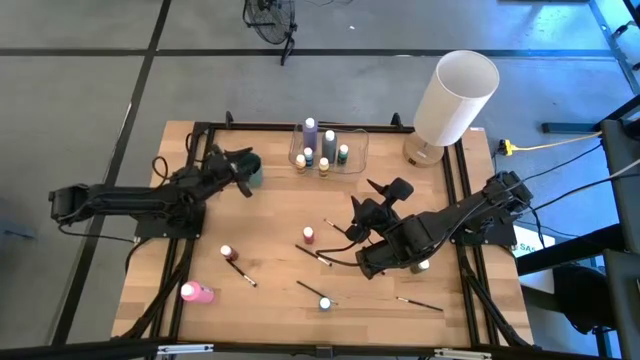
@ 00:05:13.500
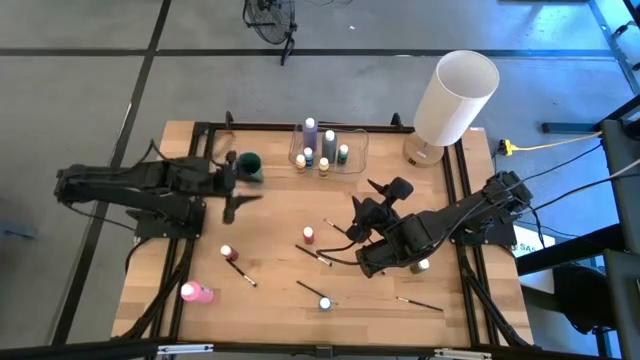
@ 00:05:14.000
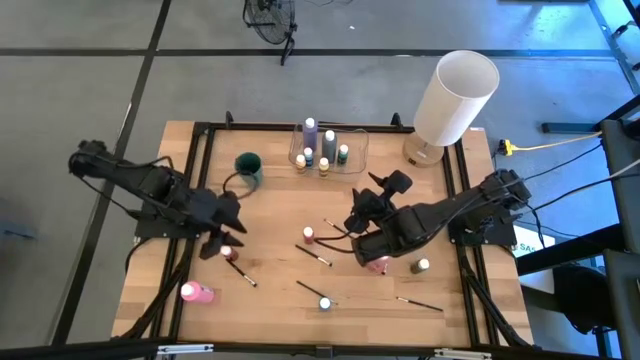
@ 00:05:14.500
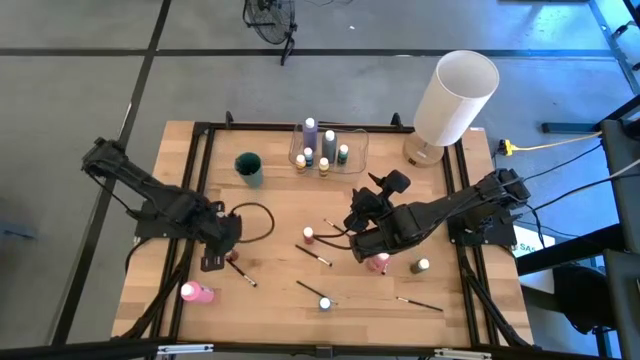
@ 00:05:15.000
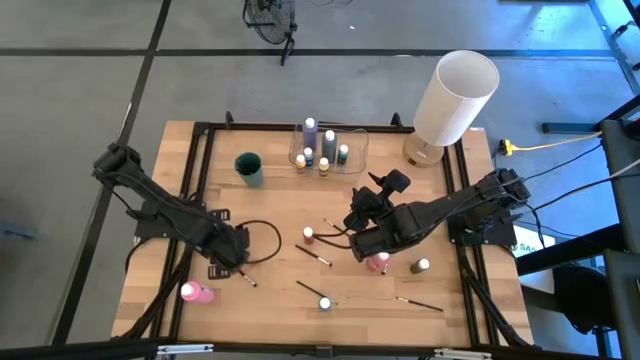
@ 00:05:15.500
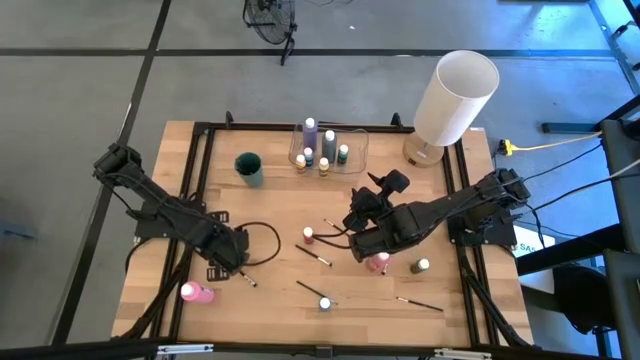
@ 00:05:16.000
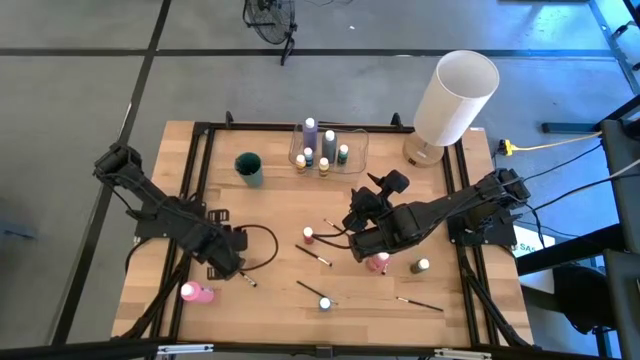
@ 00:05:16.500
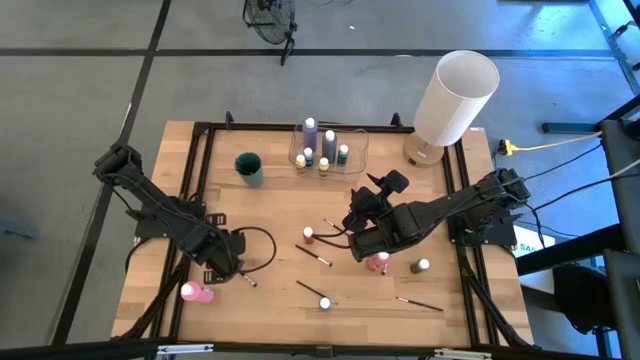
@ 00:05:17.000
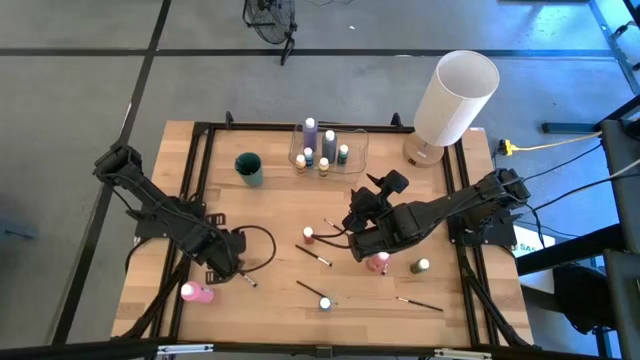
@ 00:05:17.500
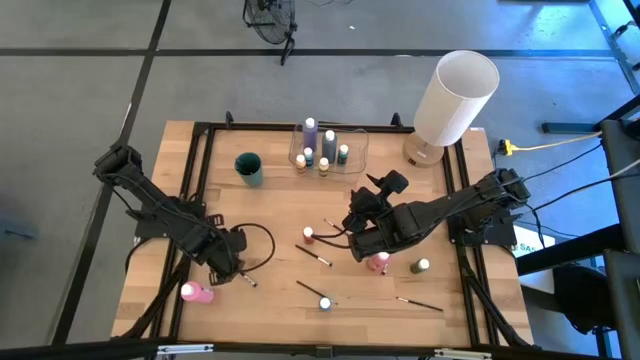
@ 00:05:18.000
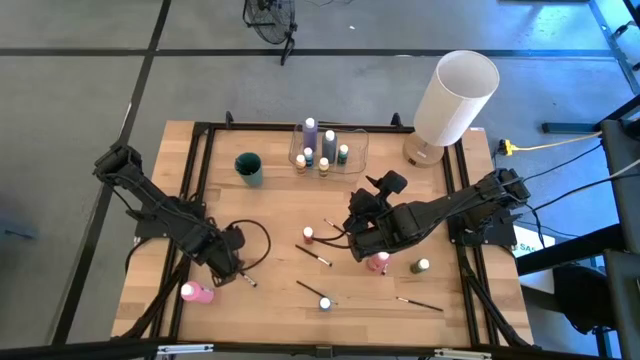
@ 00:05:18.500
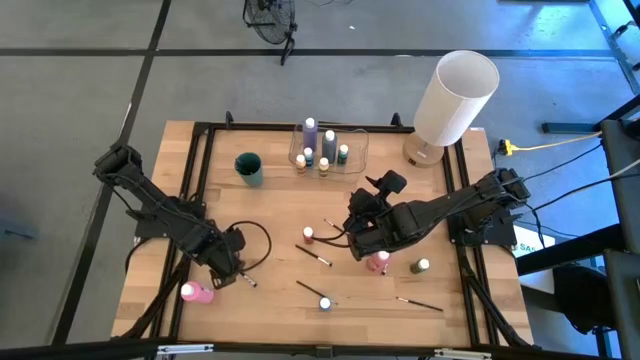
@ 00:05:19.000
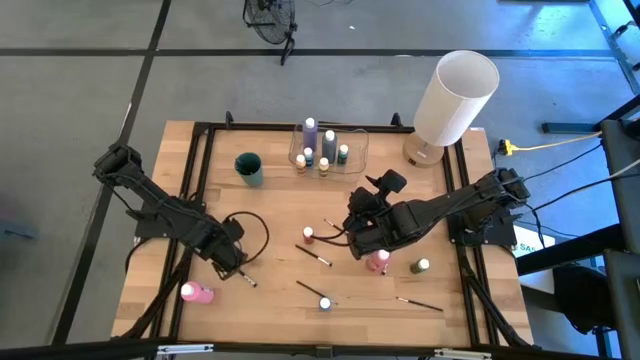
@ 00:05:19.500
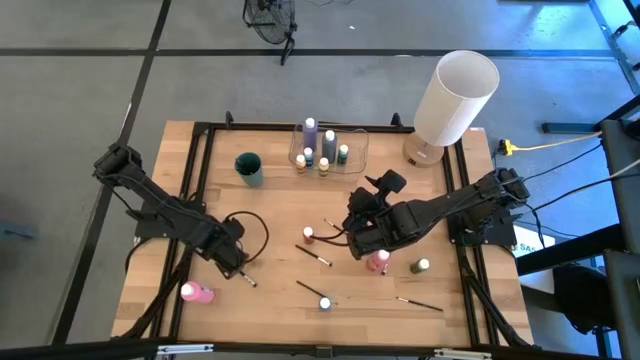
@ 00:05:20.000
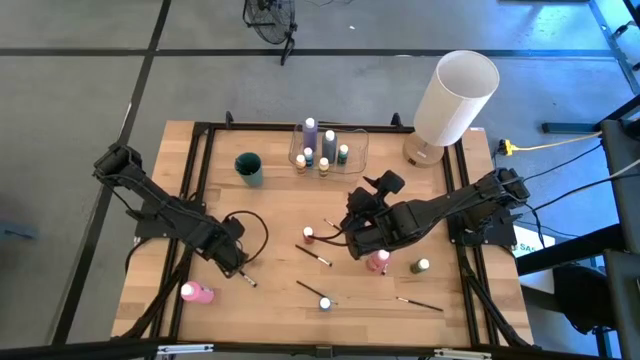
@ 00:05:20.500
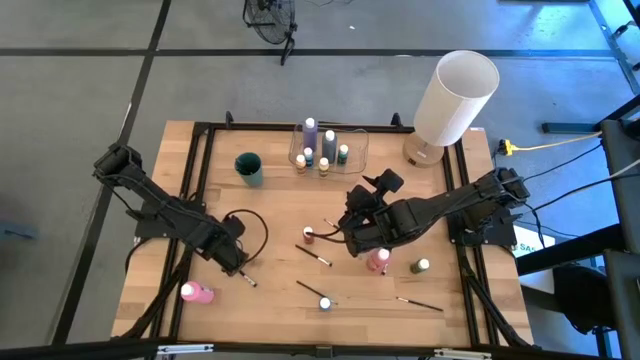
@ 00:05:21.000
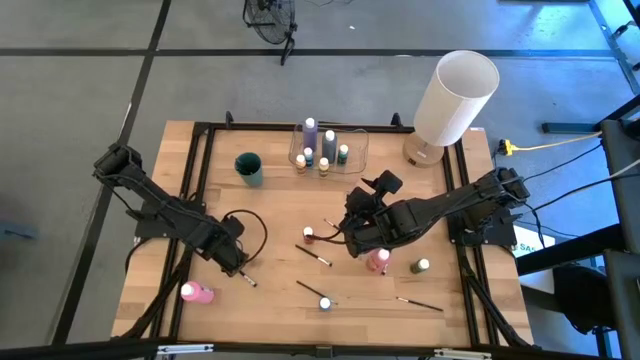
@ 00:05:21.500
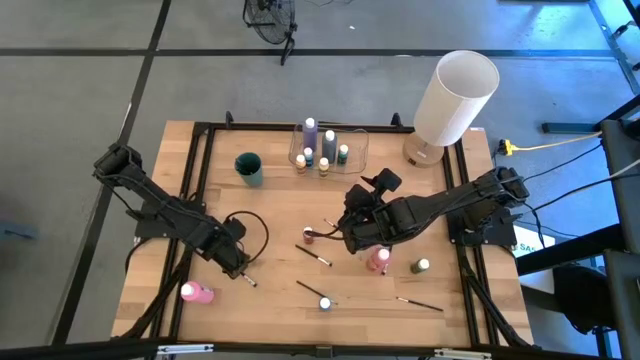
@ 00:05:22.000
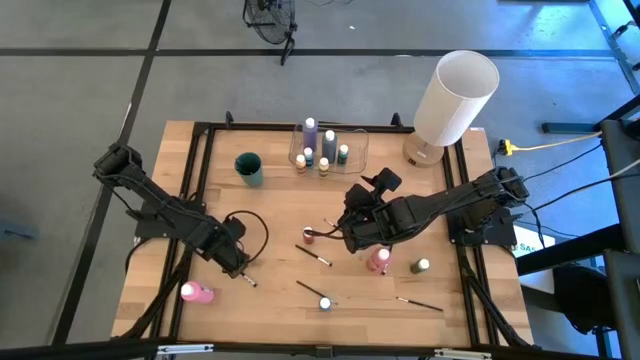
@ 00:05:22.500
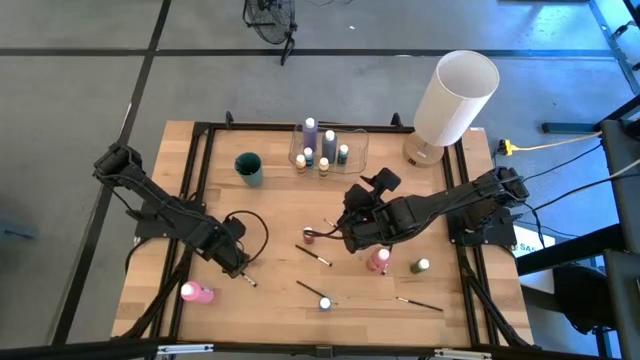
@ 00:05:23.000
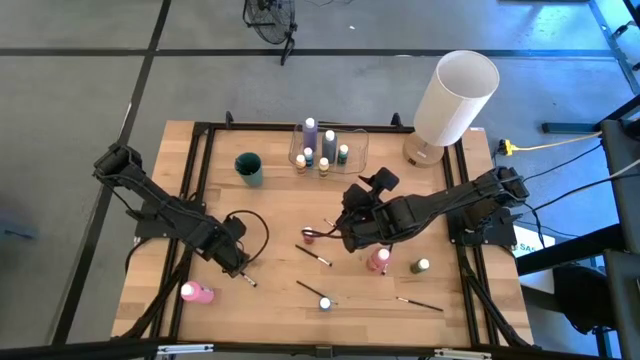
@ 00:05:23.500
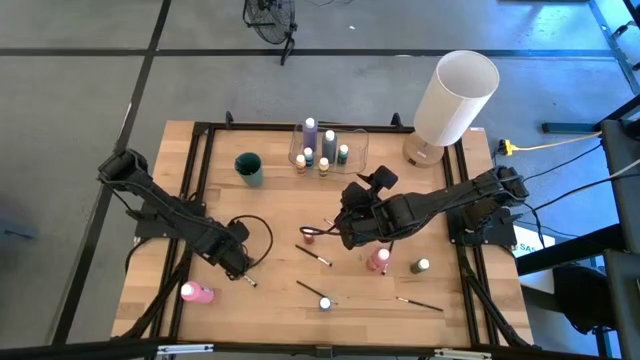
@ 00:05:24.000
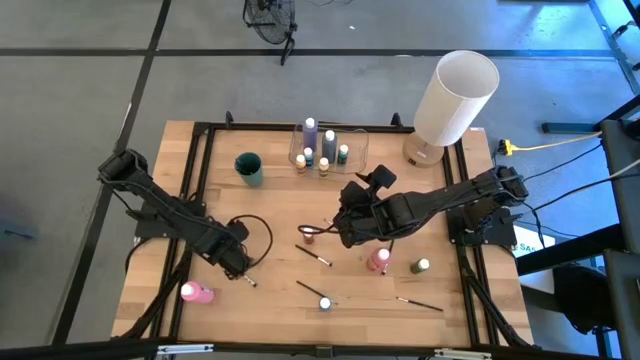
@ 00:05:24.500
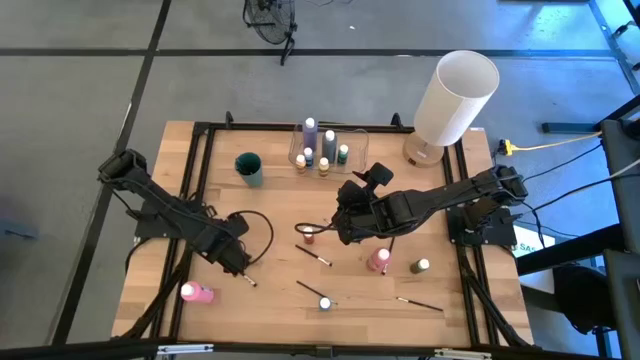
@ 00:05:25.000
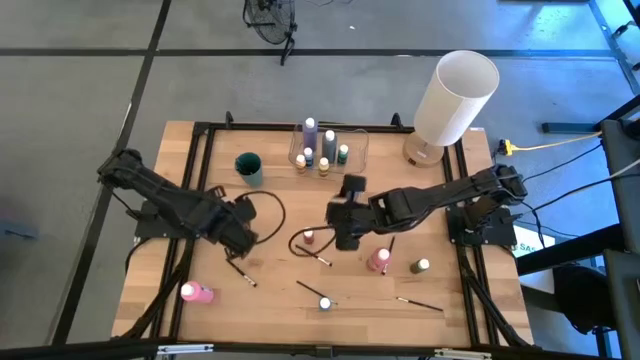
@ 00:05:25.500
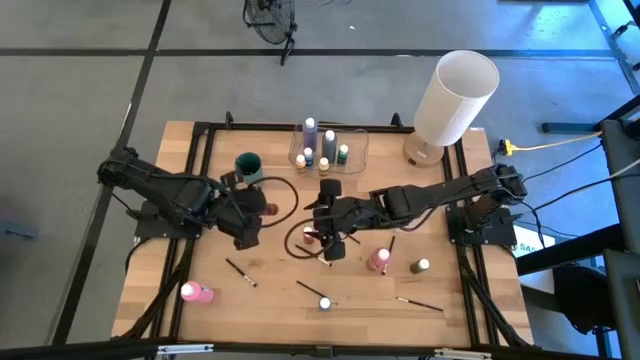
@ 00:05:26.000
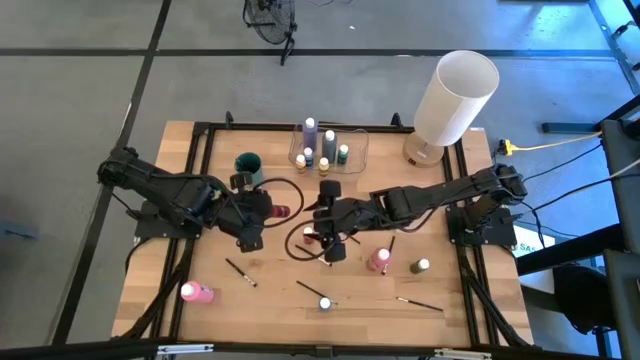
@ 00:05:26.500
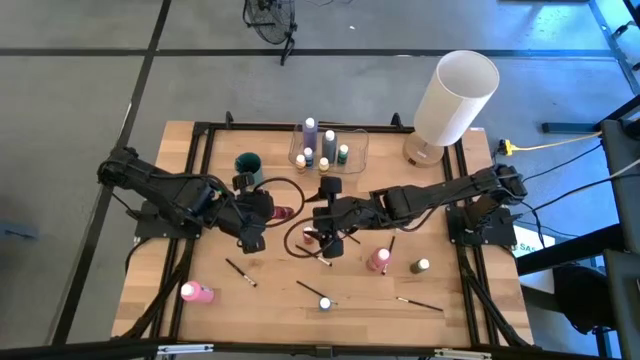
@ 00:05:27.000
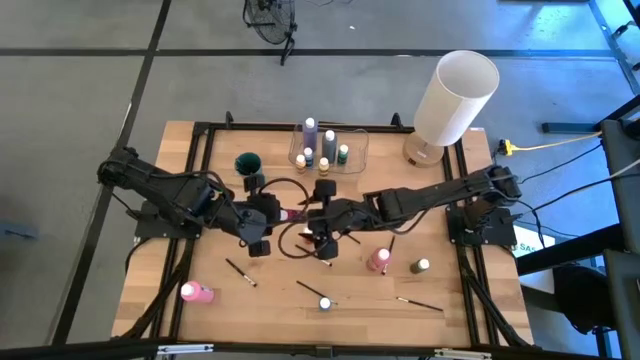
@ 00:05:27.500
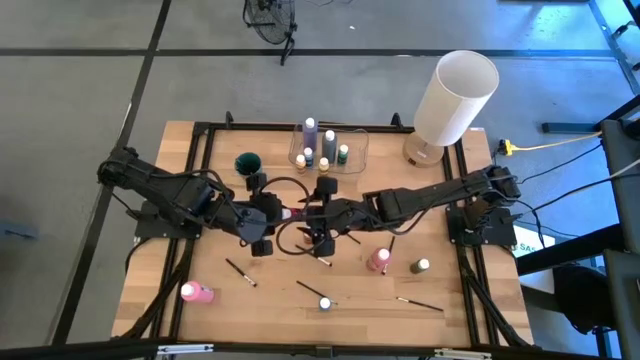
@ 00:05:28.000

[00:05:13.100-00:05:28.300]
Task: Pick & Place Paint Supplies
Put the red paint bottle into the transparent bin

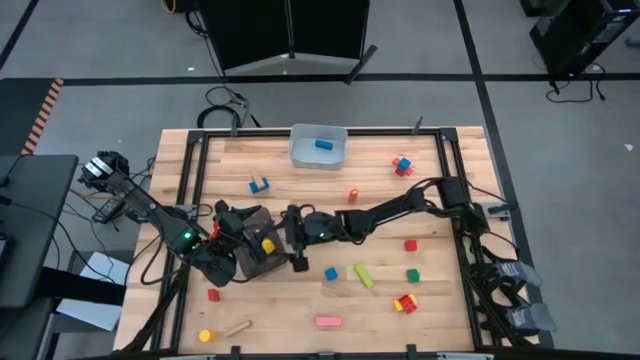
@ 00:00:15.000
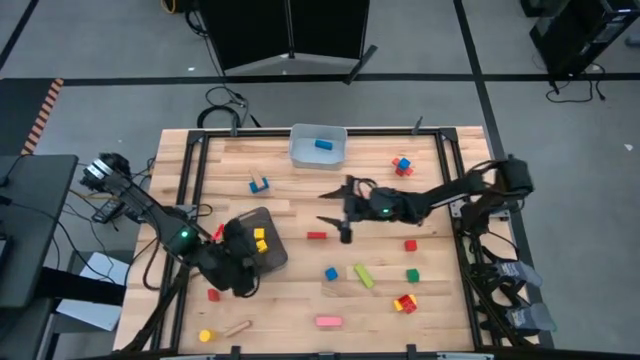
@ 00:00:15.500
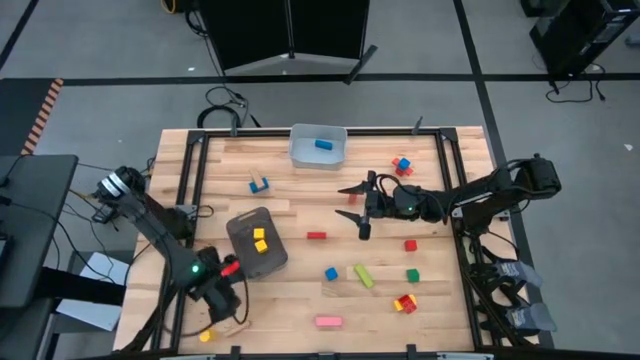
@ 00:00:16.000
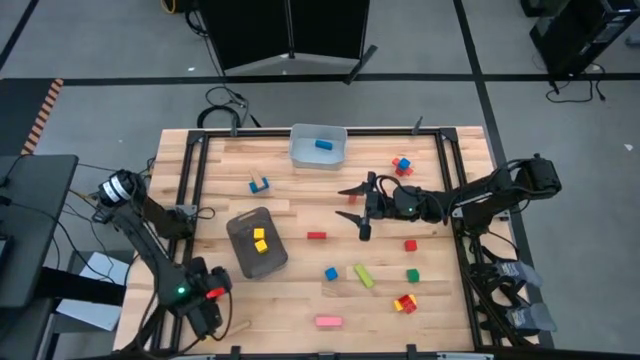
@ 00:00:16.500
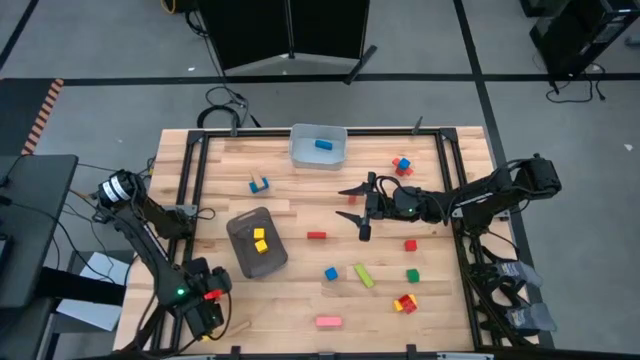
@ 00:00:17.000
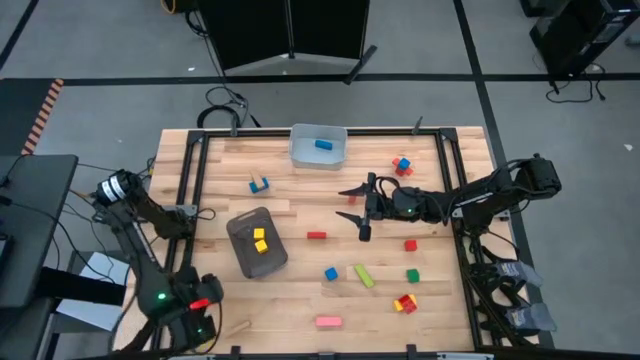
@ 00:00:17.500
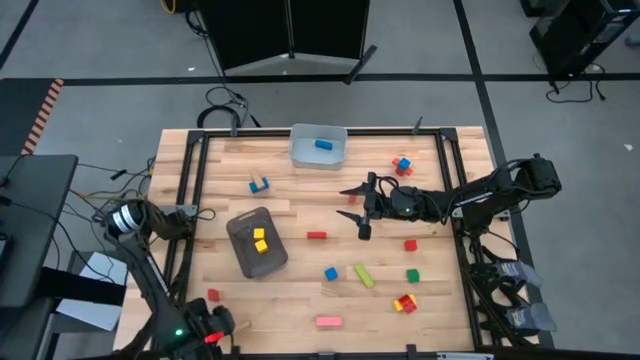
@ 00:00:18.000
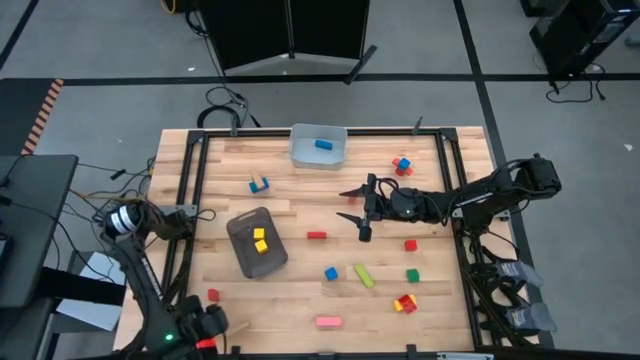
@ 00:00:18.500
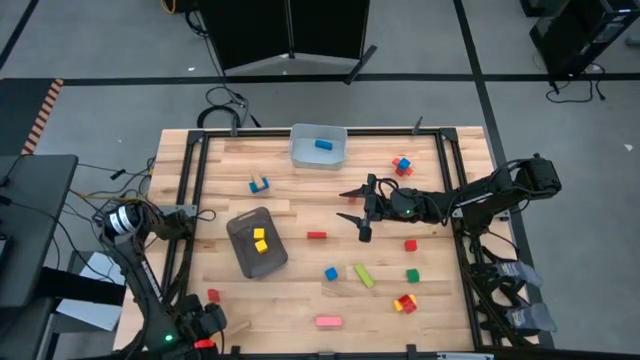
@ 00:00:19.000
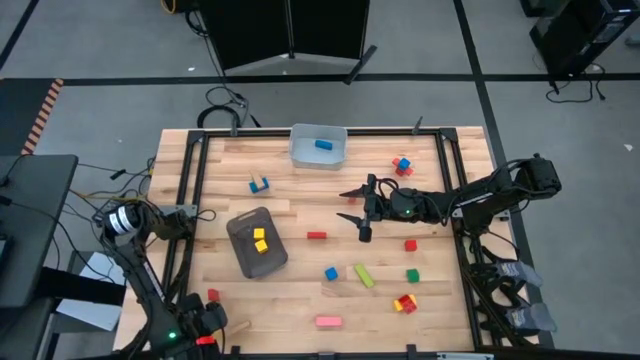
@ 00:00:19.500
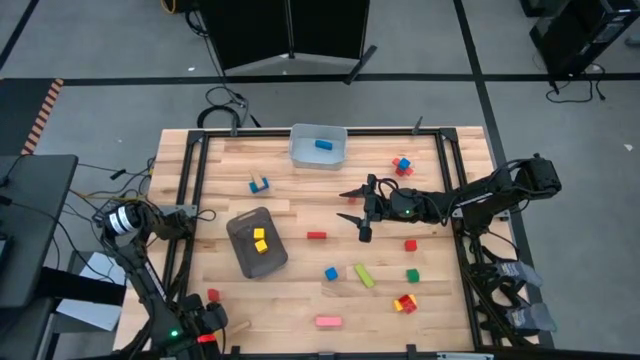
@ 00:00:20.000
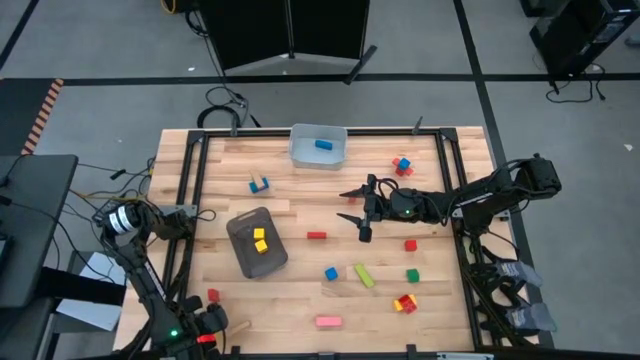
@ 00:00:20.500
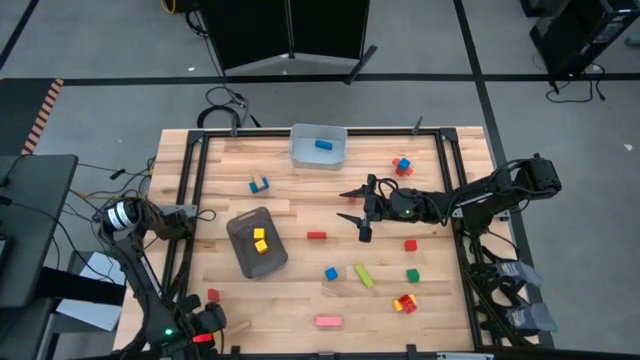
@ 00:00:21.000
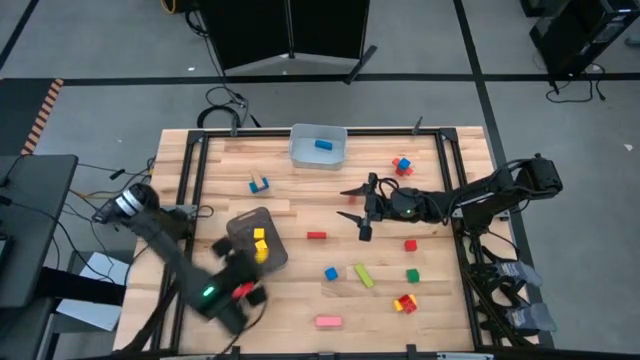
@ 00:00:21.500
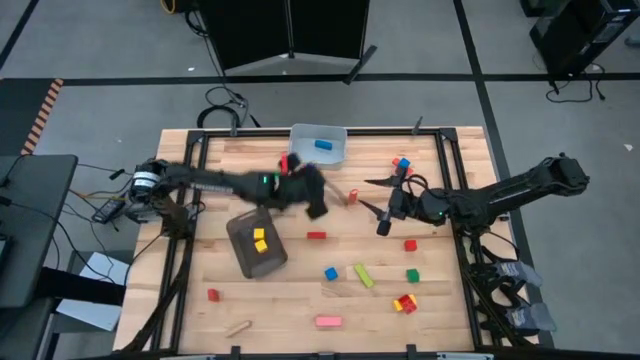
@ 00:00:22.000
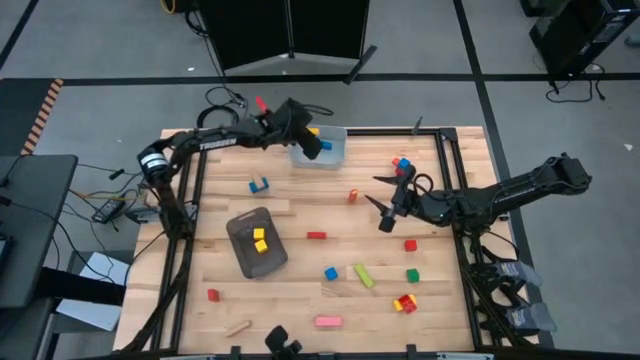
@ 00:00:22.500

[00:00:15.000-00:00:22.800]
Task: Sort blocks by size
Put the yellow cylindrical block into the gray bin
